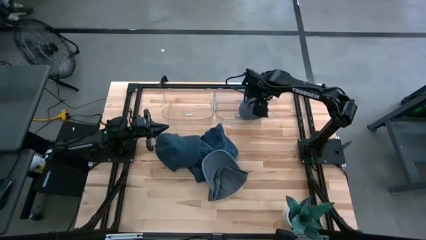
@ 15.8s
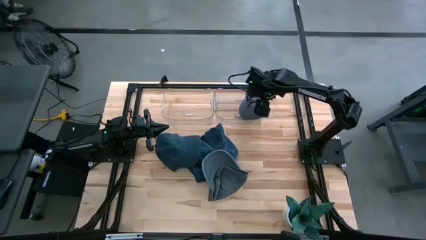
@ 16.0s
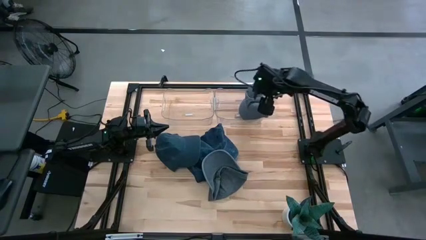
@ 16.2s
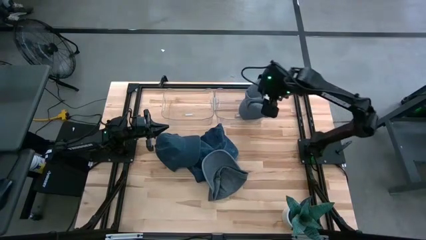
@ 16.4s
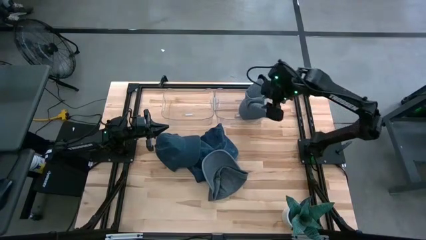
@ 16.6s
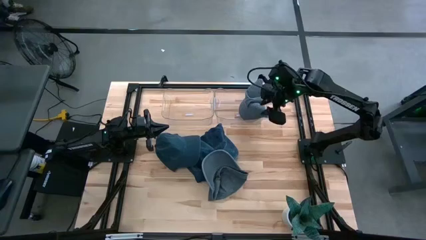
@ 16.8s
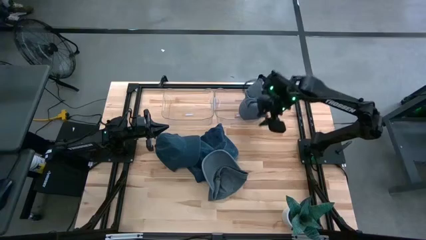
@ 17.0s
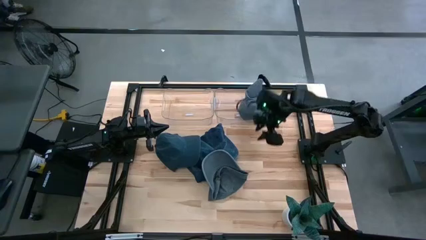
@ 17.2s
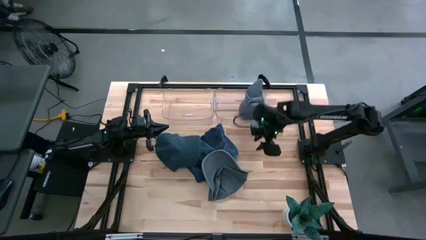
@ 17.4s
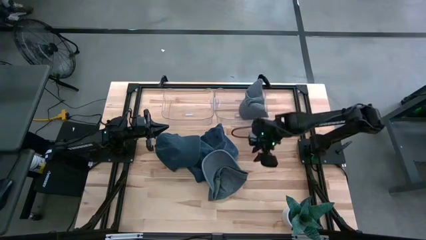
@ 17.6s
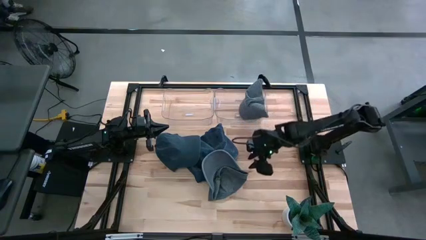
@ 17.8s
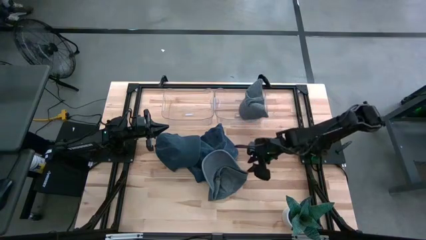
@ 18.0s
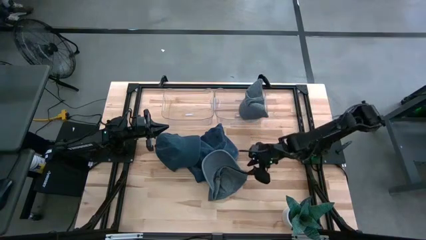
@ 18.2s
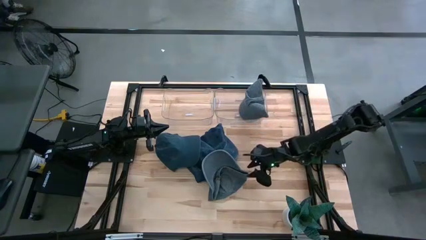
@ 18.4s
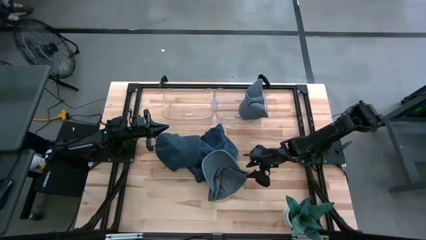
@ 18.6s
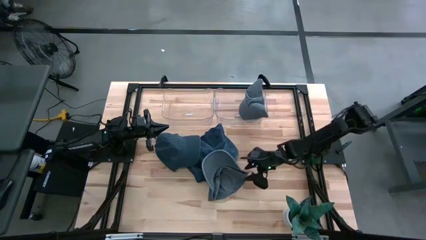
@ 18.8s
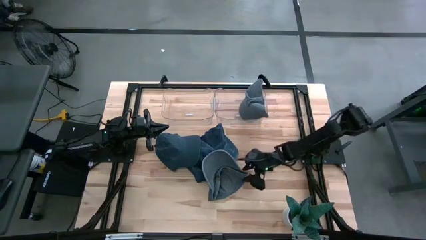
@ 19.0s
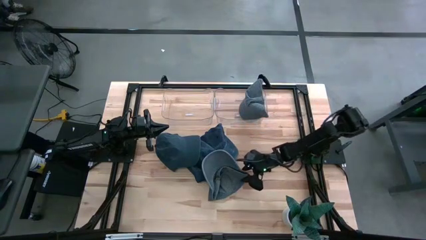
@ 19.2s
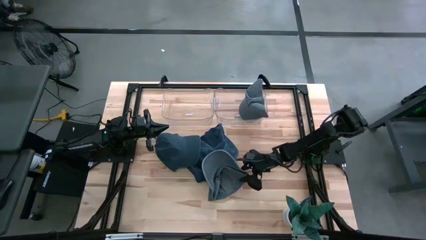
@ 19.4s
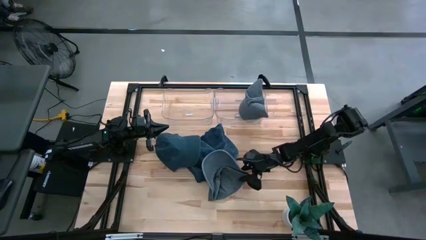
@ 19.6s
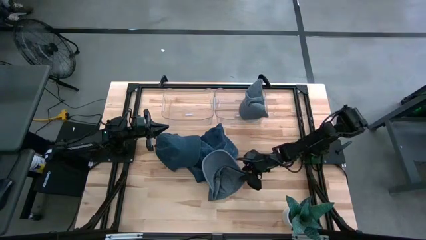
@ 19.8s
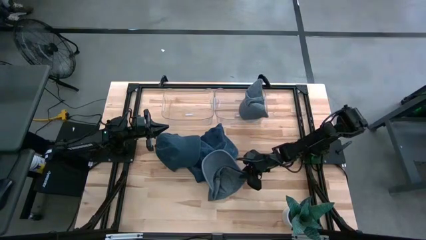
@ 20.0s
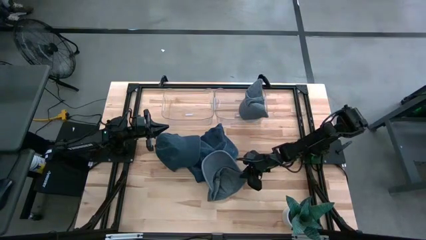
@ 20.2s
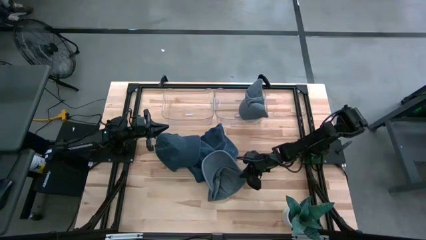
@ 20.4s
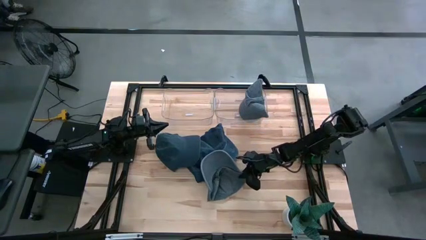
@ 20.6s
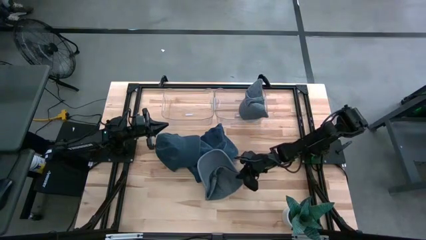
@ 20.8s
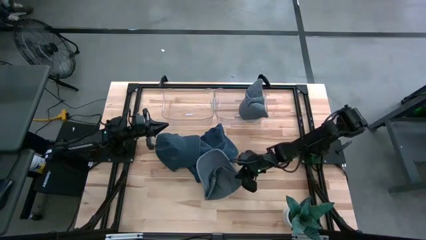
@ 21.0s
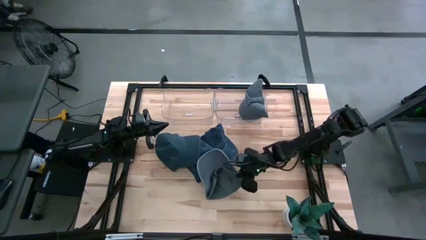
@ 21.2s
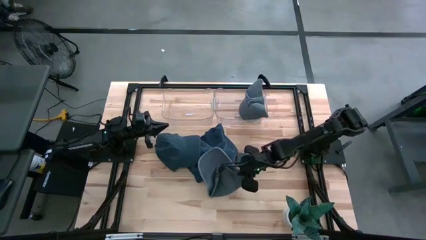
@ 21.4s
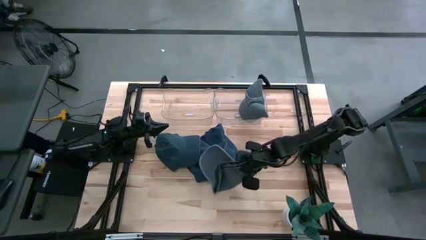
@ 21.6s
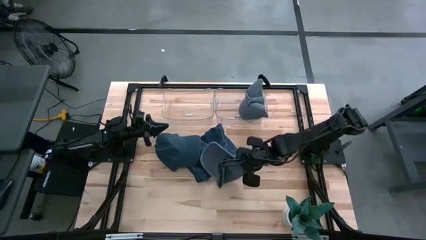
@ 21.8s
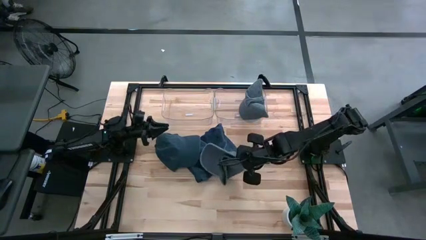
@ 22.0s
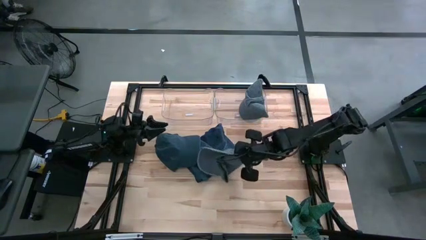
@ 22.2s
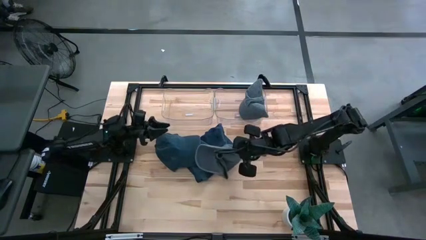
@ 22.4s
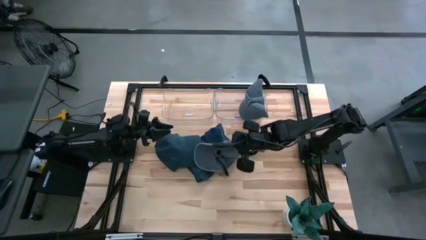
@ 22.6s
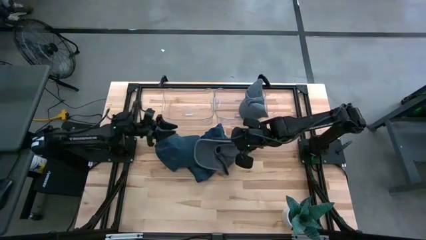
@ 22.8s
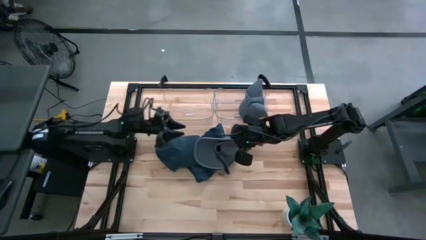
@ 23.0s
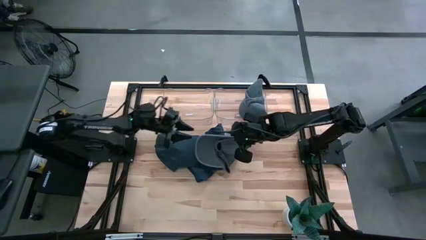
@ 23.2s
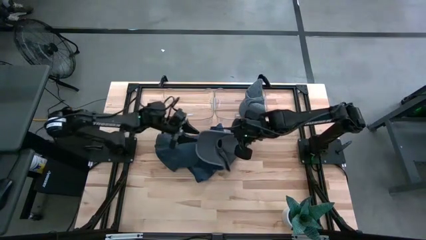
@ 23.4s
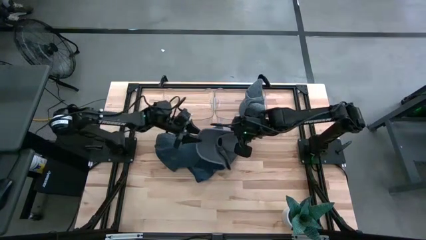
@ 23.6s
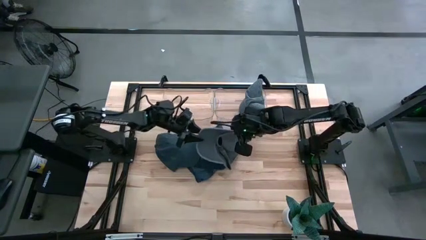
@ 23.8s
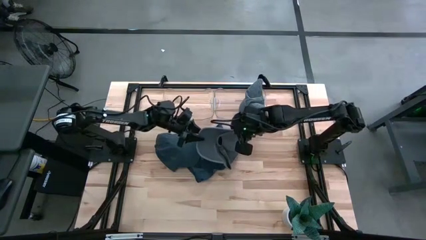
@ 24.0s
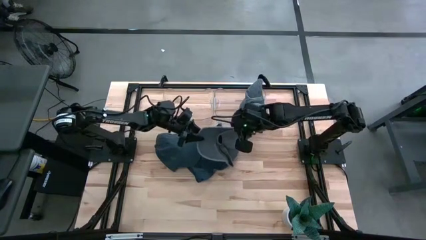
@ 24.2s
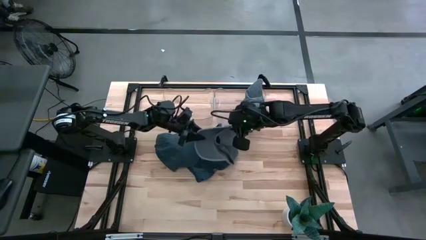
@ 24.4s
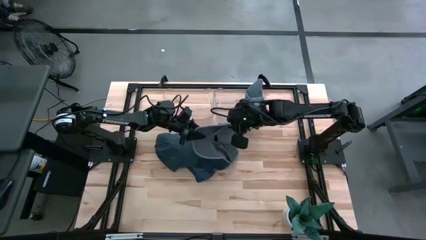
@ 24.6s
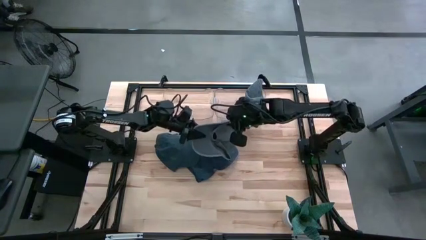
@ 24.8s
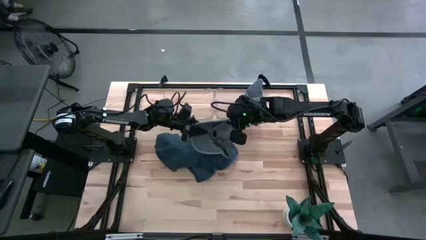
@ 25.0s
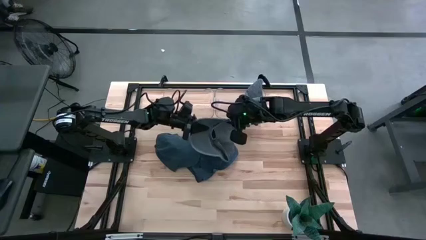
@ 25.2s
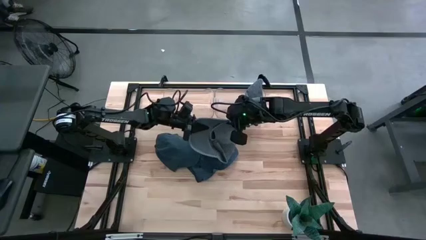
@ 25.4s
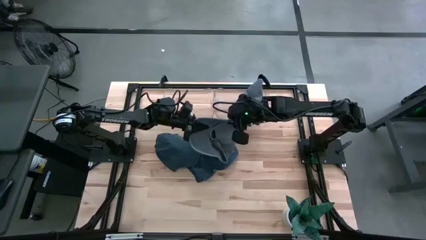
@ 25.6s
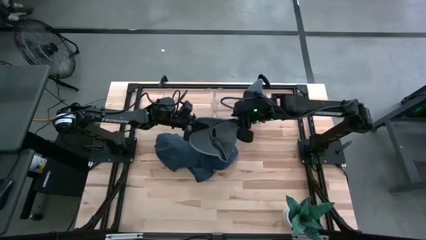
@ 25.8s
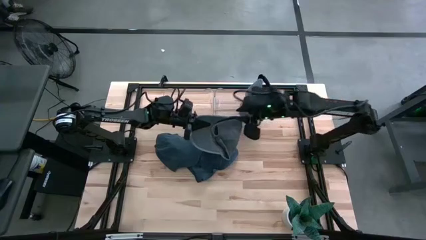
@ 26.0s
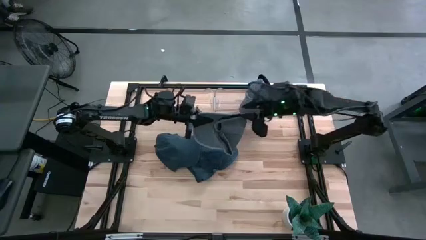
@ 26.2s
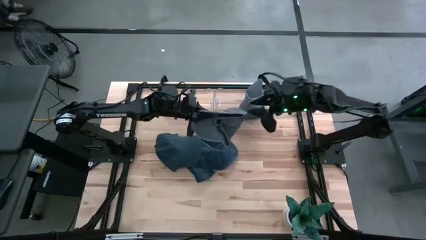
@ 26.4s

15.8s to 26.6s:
Task: Pick & Place hat
Put the gray cap into the right transparent bin

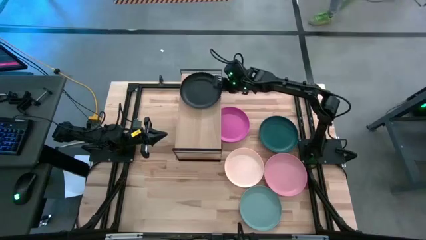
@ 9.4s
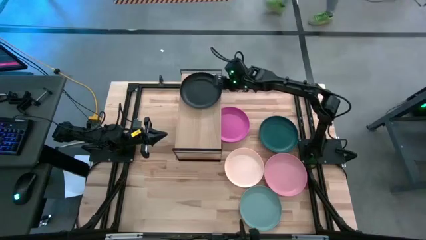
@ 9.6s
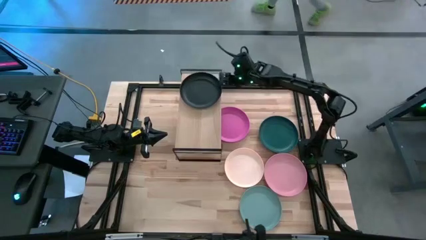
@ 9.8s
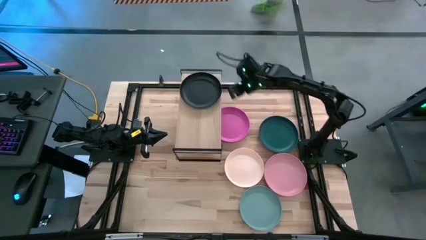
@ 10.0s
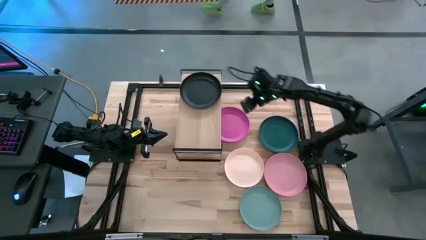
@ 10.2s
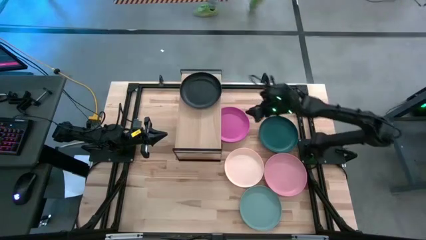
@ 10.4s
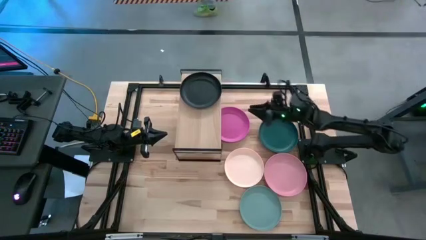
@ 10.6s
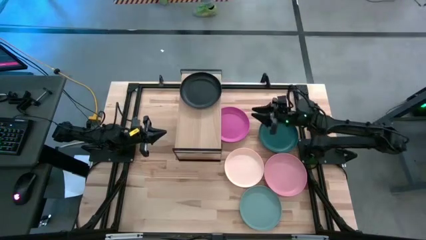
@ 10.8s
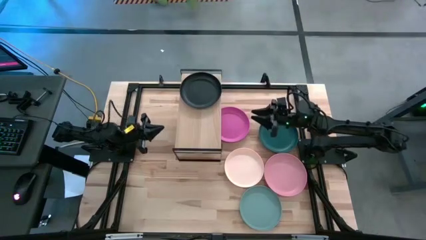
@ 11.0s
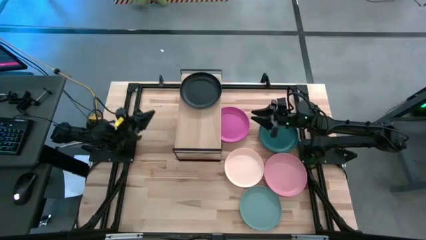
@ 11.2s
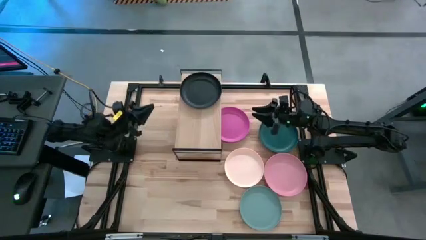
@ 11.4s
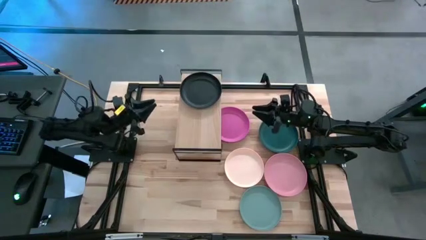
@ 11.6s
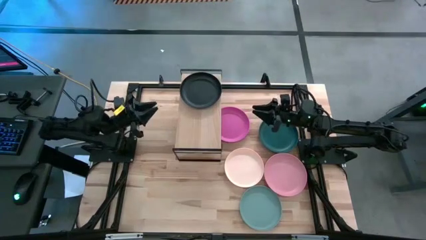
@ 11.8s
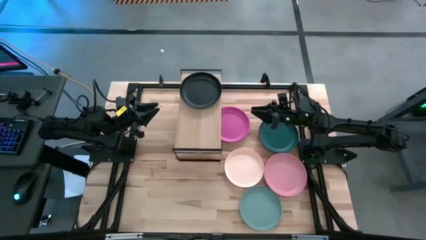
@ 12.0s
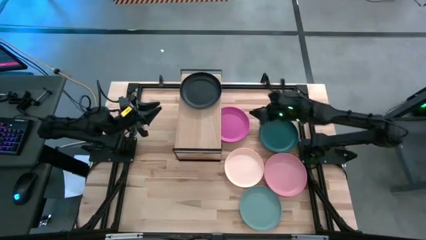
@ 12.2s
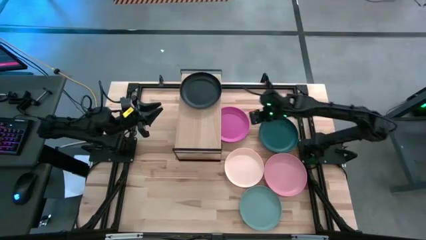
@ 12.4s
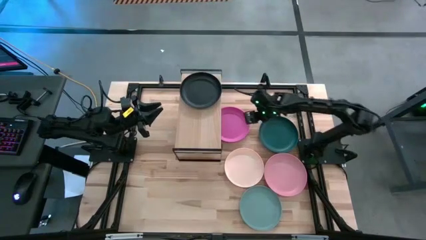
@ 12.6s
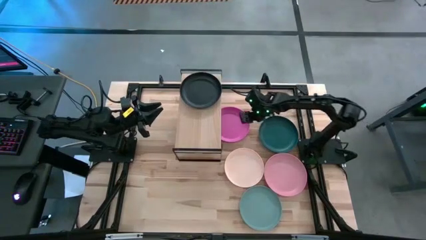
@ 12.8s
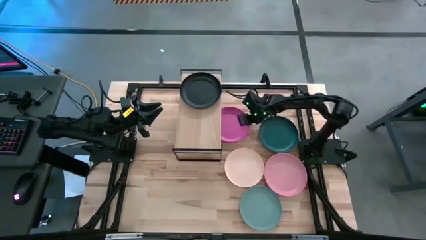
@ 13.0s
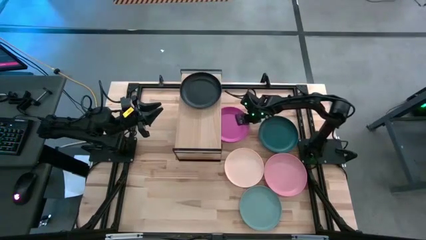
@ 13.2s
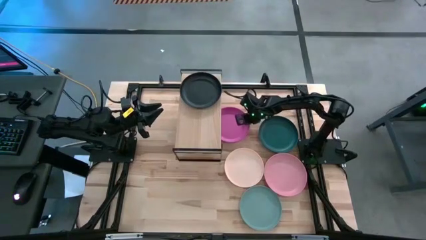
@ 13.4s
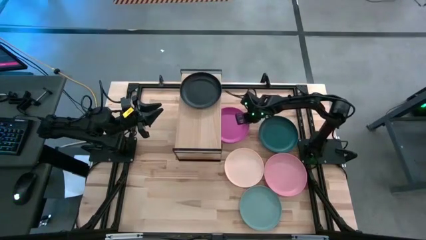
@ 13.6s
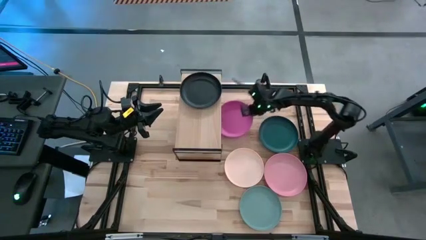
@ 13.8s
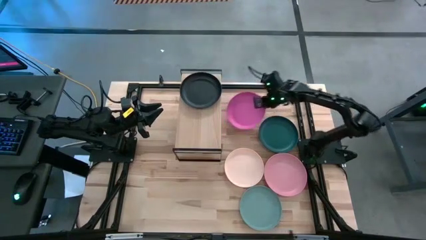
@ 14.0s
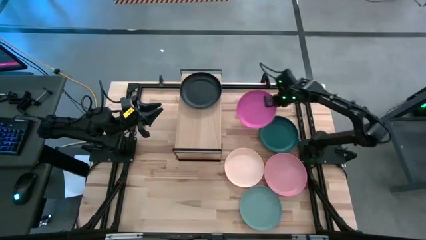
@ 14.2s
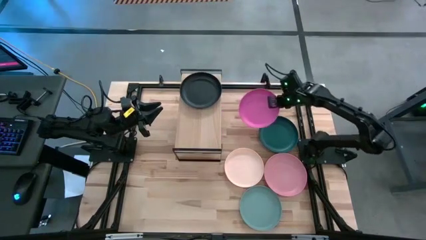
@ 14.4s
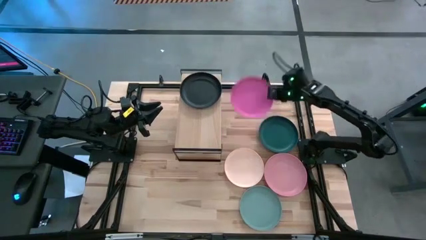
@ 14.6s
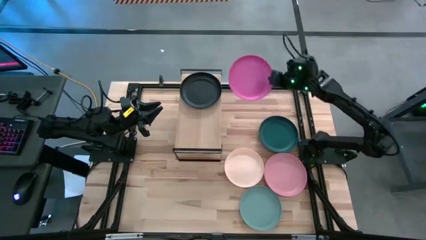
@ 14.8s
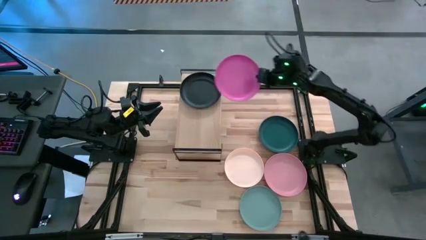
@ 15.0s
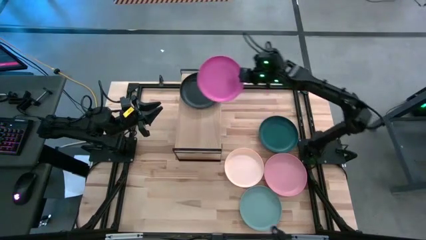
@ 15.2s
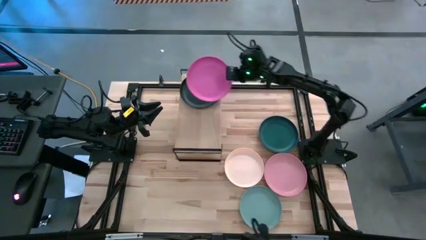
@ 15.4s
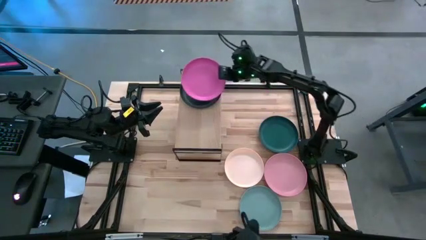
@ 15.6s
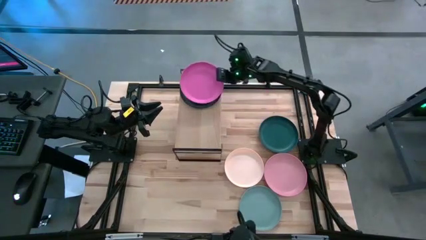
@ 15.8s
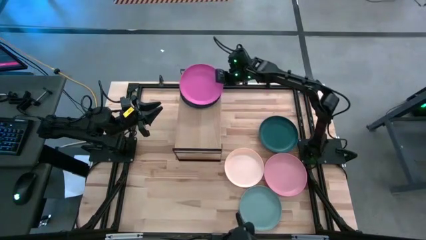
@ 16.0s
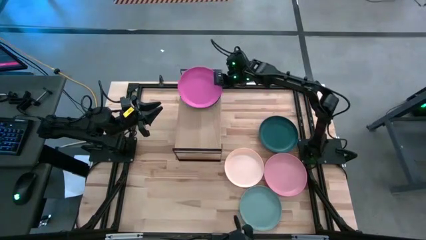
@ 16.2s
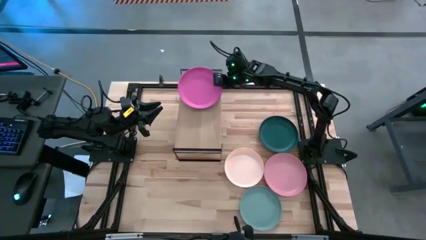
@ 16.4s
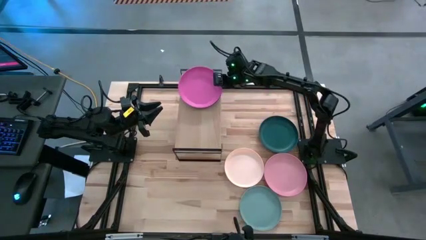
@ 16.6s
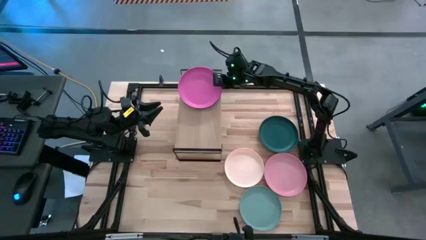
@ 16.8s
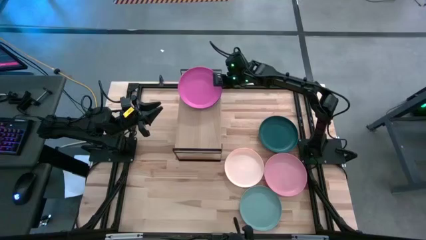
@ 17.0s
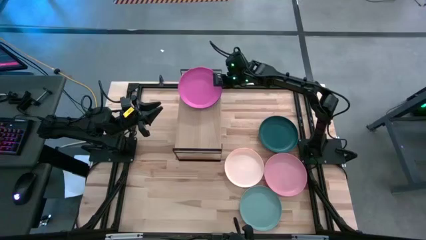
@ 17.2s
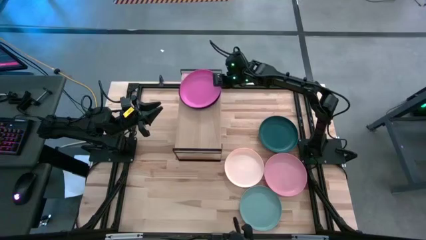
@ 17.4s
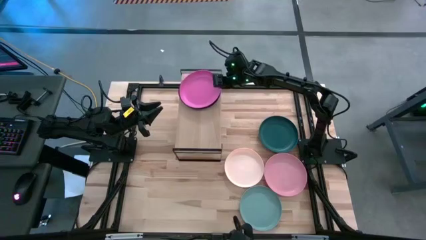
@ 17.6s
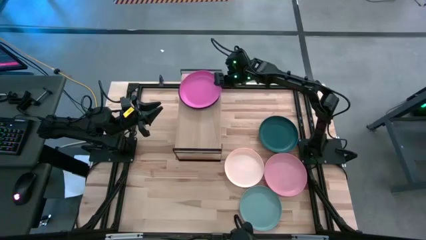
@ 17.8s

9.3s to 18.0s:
Task: Place and stack plates onto a shelf
Stack the pink plate on top of the black plate on the shelf
